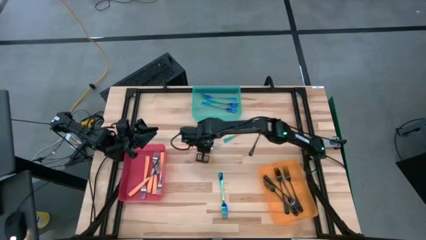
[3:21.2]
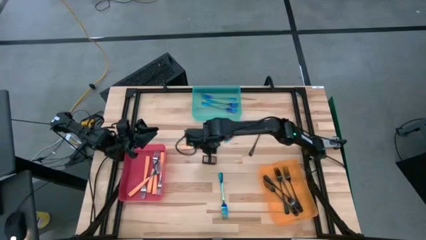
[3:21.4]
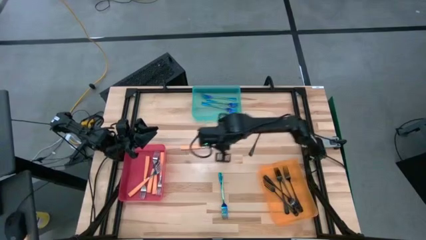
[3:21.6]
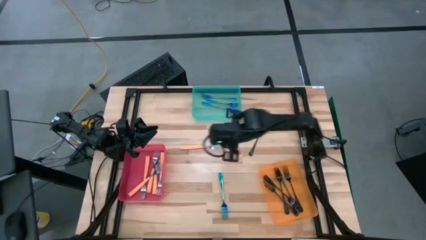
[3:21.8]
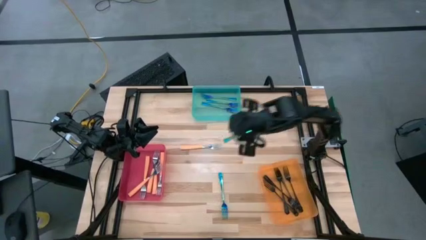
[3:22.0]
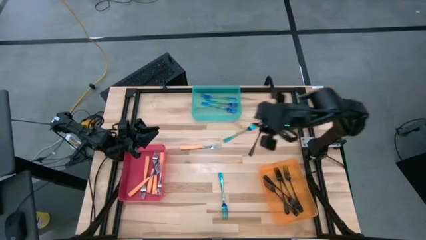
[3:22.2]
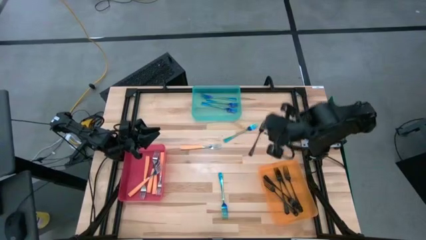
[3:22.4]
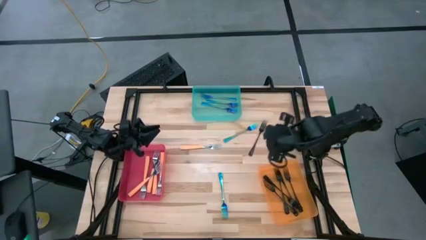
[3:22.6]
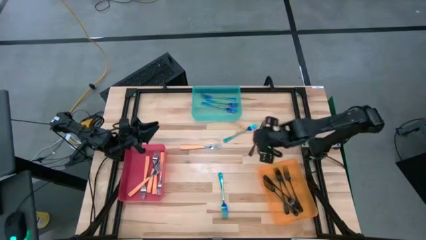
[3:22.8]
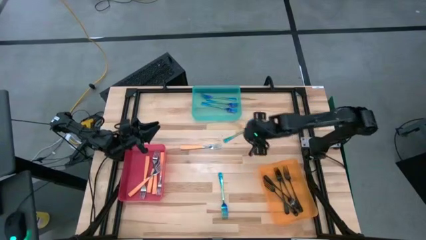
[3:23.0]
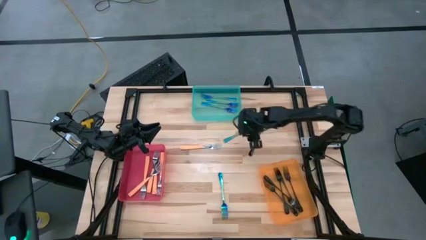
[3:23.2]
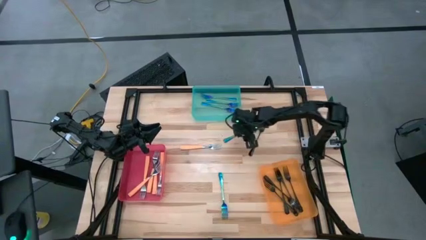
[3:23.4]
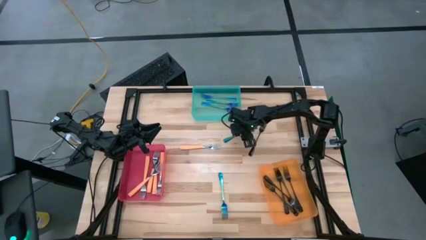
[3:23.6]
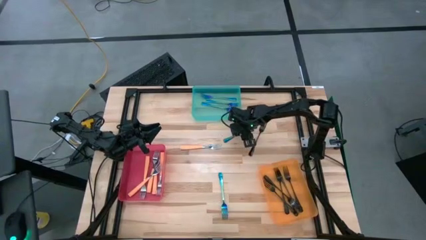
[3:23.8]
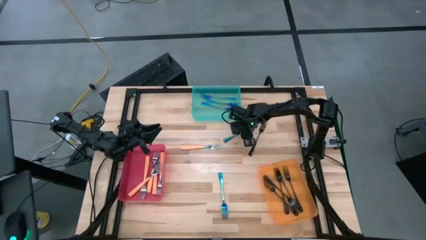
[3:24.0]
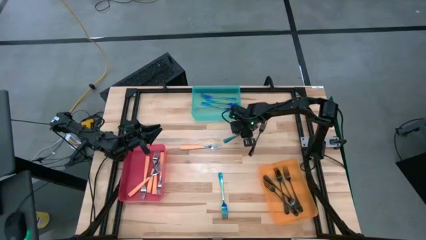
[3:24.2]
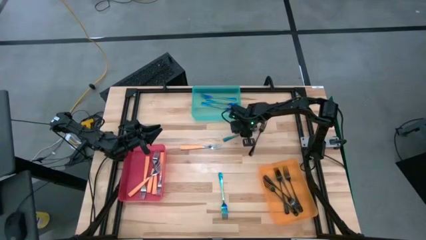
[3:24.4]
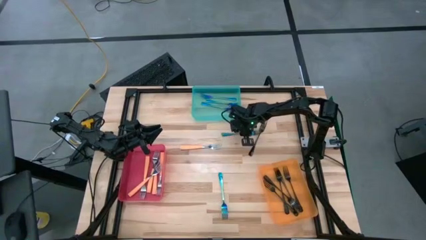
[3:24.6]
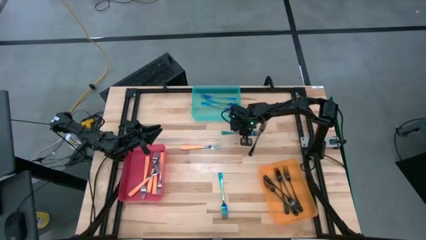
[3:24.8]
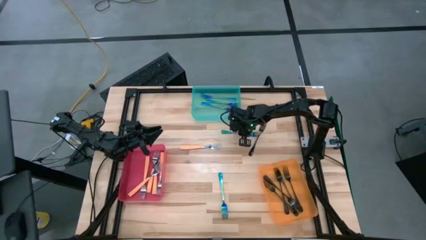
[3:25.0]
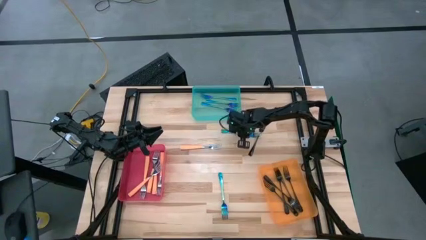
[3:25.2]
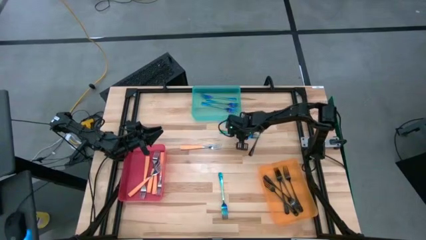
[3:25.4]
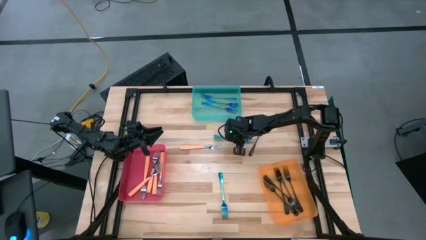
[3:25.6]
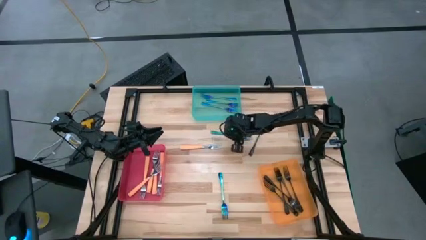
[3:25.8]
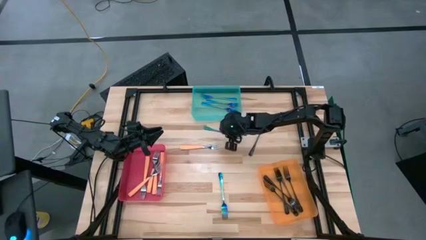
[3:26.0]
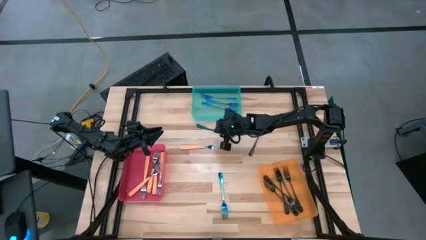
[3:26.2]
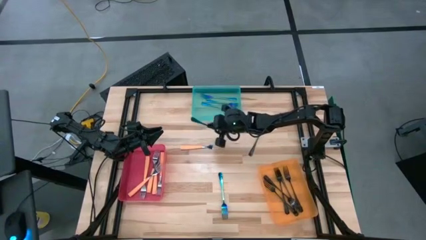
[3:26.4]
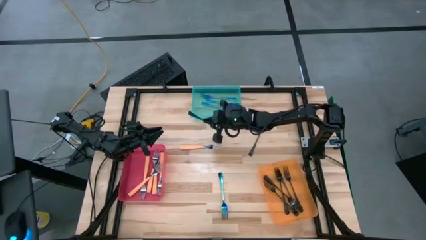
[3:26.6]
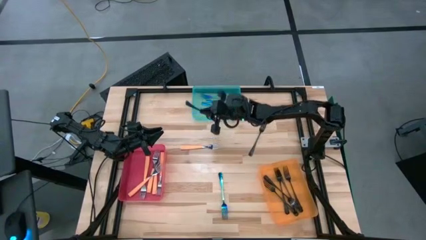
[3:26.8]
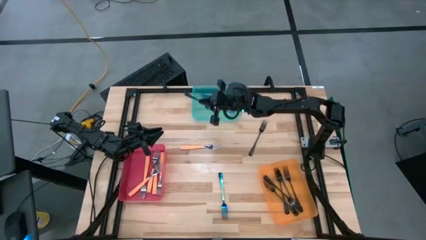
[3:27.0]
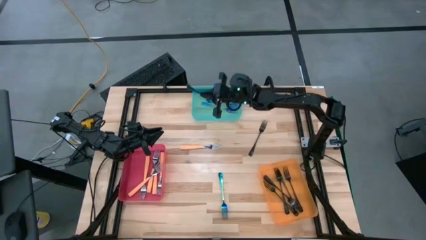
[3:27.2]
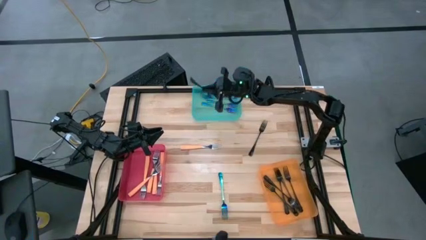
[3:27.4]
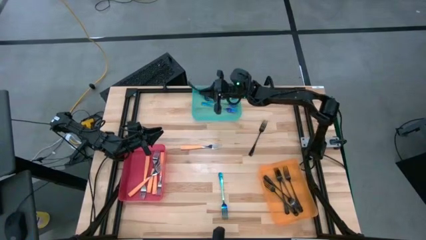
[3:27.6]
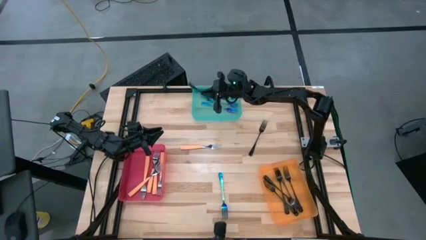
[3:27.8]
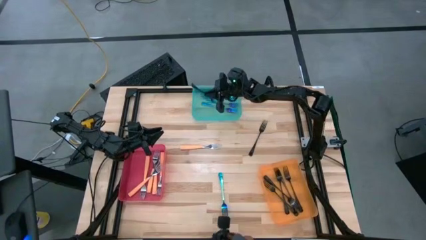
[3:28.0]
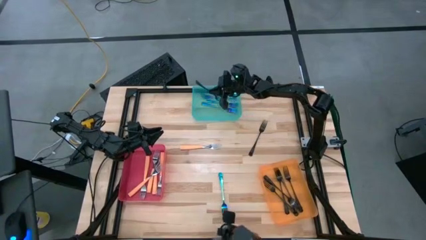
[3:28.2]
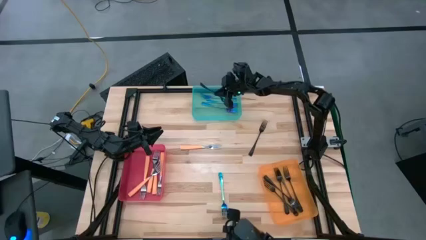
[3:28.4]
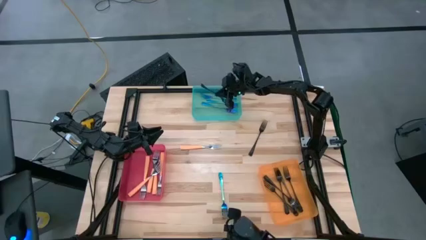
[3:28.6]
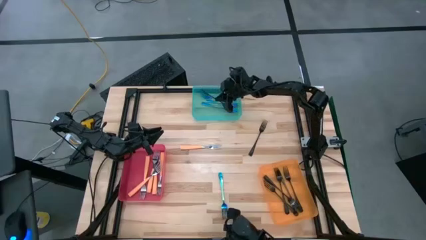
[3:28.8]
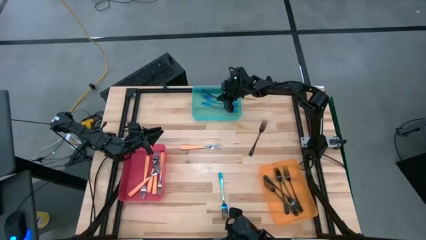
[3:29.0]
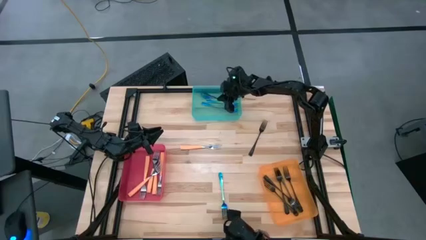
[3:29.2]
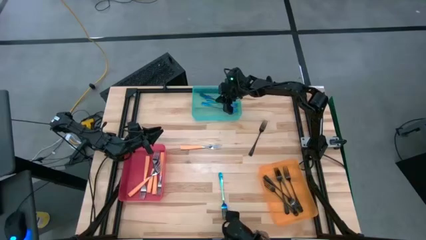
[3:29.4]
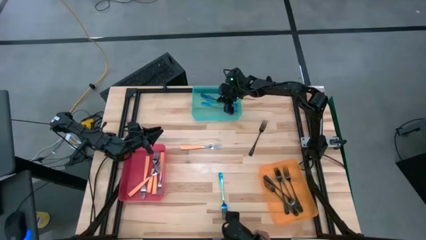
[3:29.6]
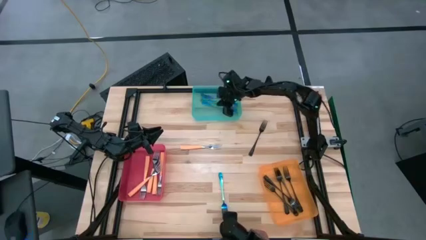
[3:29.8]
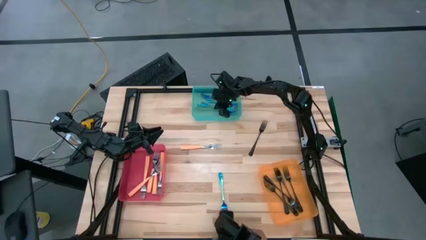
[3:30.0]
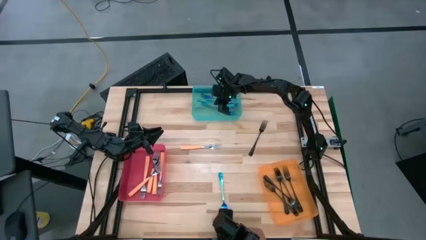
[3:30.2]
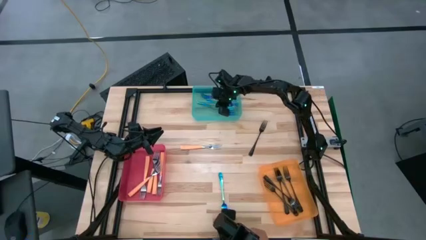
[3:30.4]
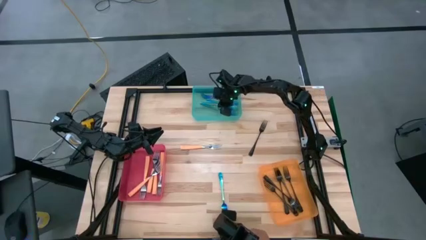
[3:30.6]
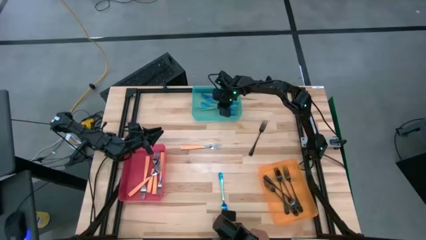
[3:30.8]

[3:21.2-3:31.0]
Task: Sort silverware by color (type)
Put the blue spoon into the blue bin

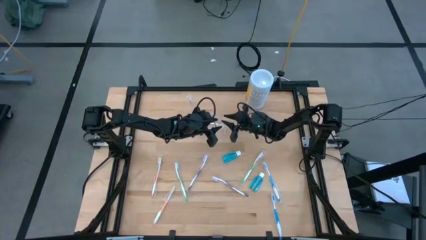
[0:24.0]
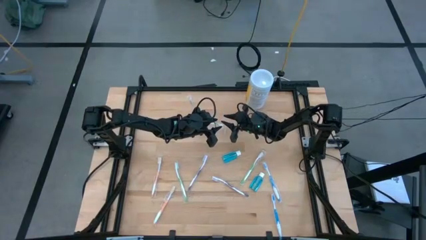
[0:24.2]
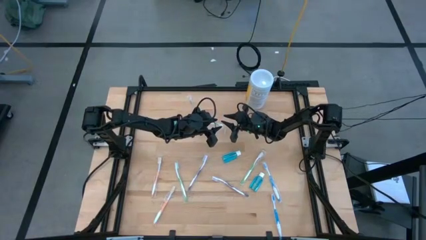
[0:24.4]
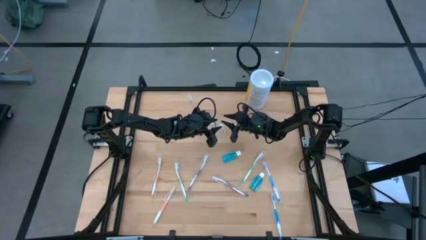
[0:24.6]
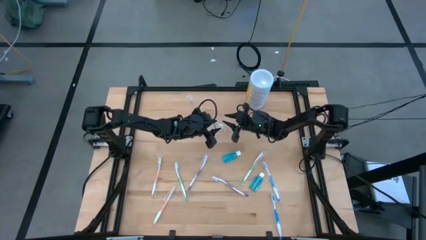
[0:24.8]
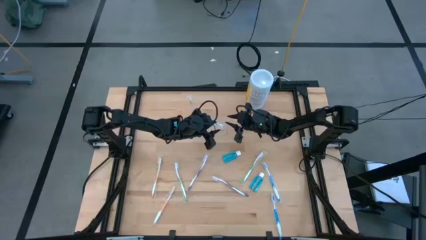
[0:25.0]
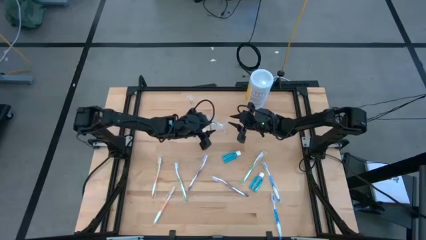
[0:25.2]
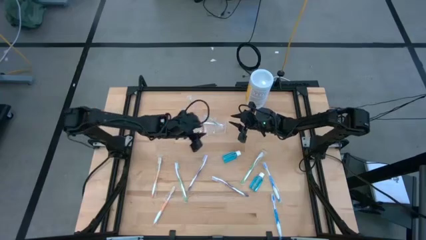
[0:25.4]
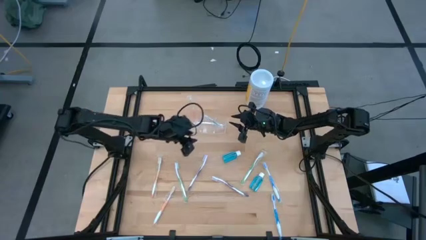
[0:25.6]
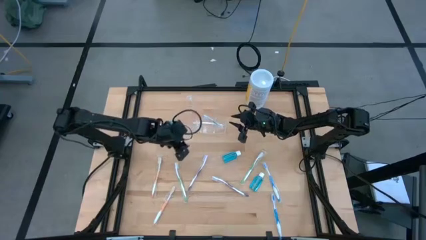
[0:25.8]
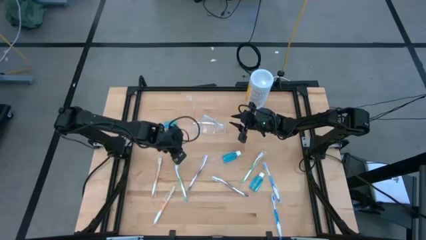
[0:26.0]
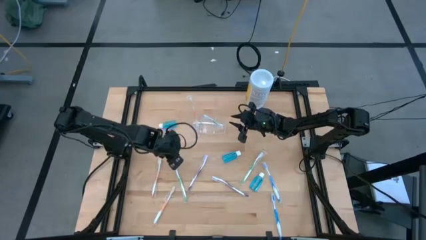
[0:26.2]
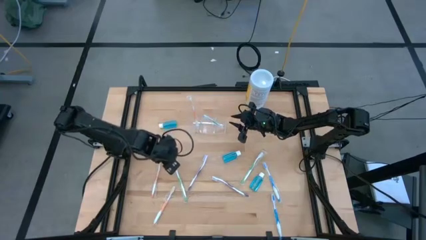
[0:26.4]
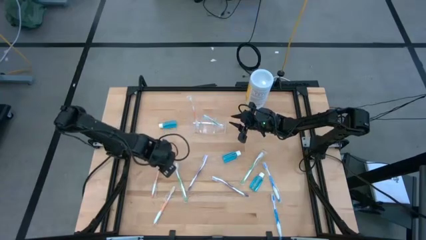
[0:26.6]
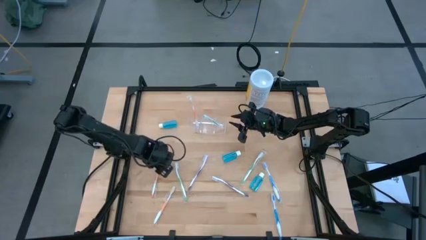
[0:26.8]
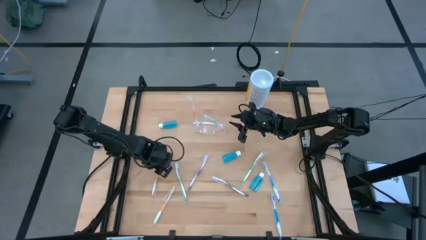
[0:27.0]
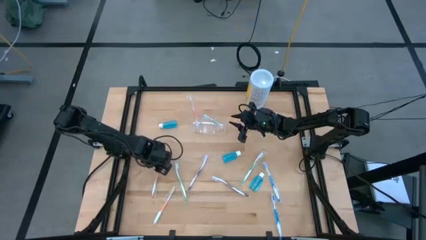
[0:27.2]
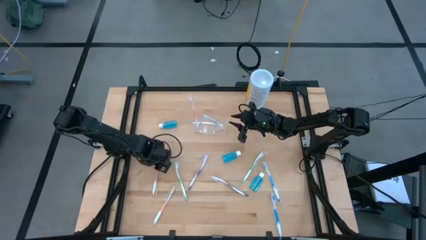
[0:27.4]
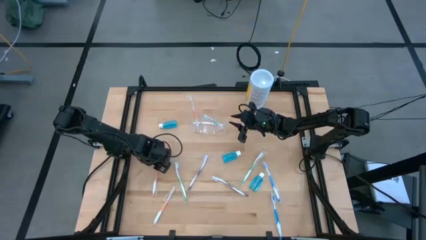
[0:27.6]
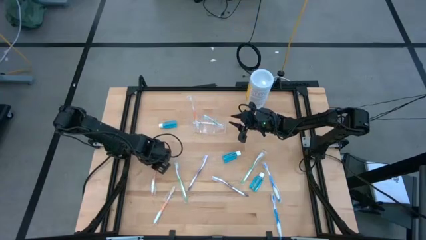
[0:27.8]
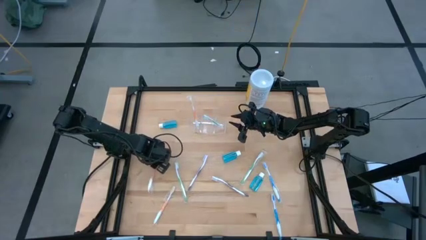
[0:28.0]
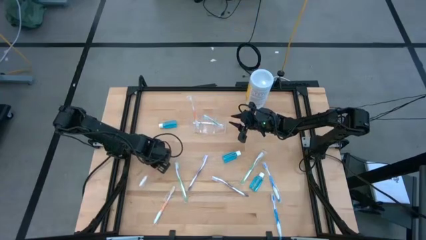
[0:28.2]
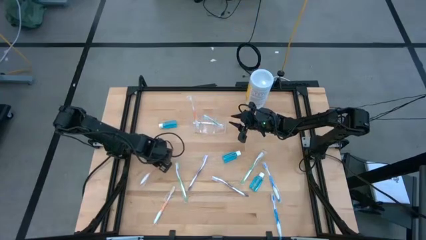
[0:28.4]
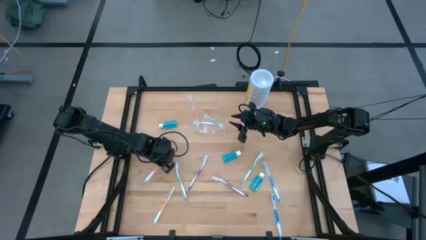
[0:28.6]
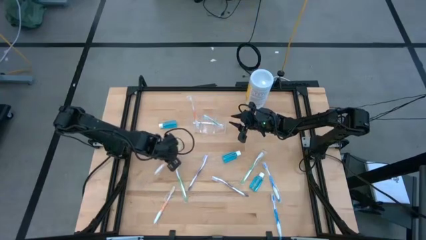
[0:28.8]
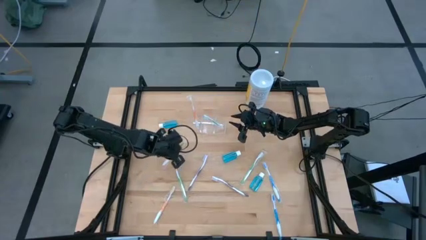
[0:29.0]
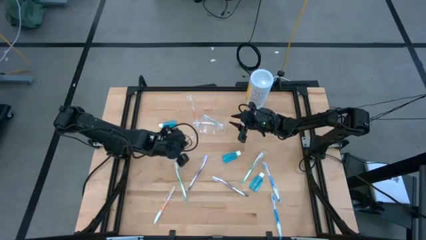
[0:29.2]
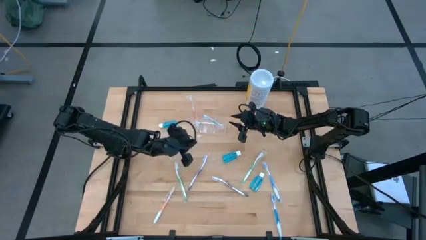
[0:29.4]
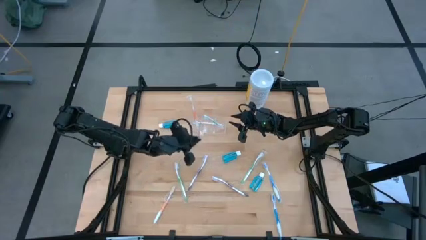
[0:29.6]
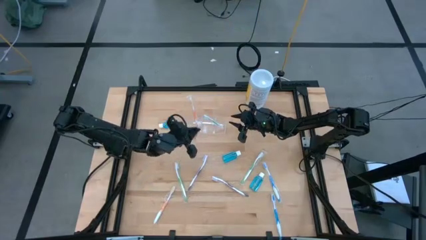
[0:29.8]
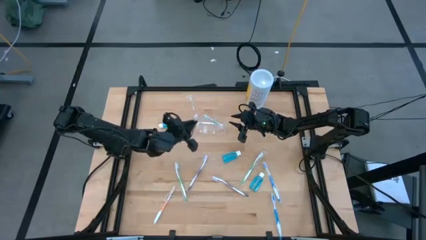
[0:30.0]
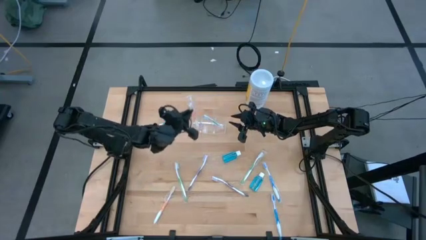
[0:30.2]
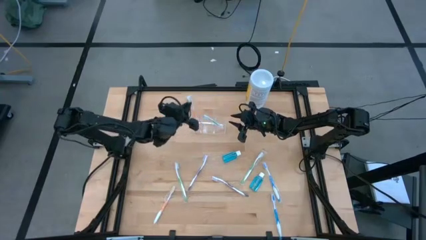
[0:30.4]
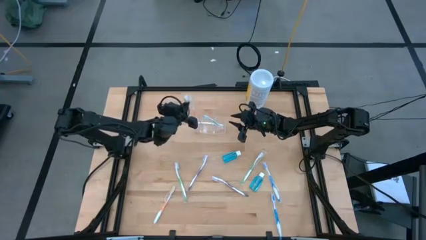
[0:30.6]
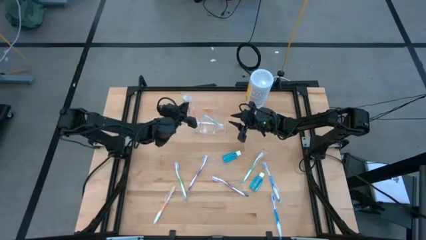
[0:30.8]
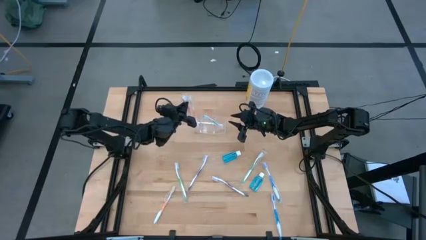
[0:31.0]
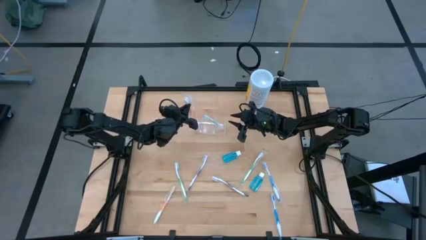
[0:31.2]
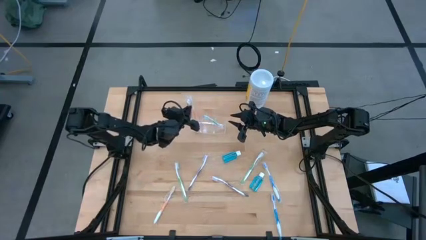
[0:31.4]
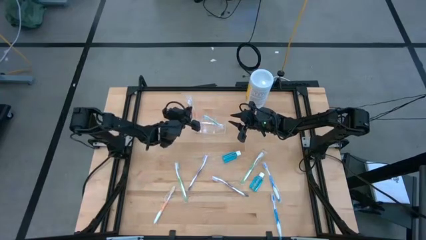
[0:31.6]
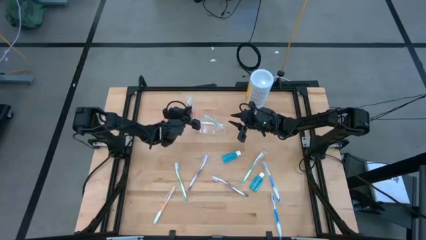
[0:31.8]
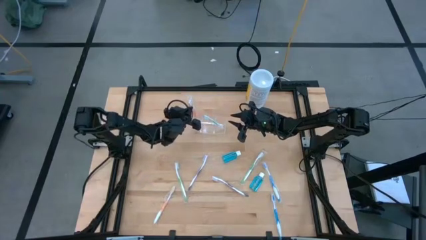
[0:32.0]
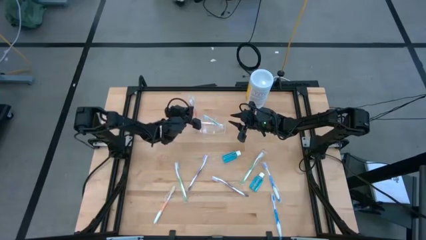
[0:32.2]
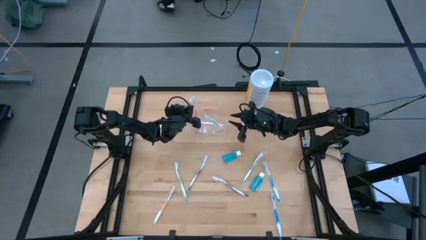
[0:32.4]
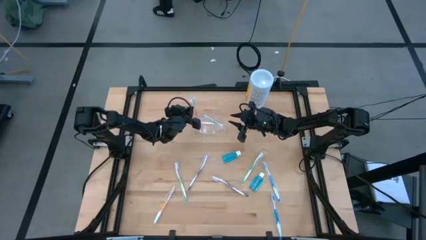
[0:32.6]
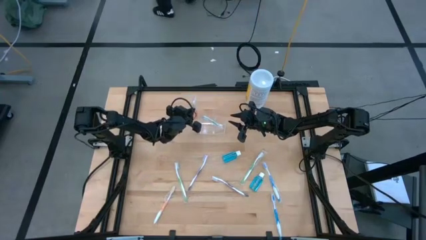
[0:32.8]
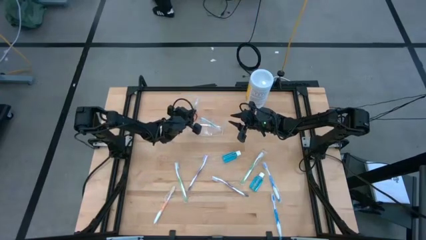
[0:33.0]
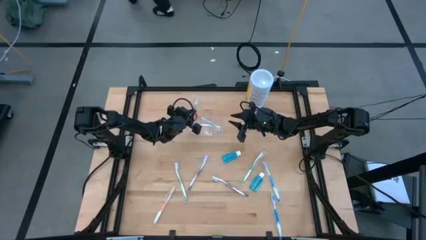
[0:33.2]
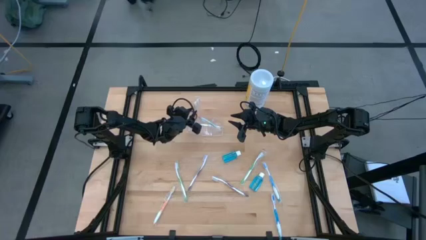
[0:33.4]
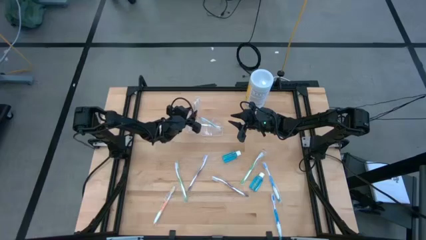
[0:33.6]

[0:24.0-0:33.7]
Task: Pick & Place toothbrushing station
Put the top orange toothbrush into the transparent organizer
